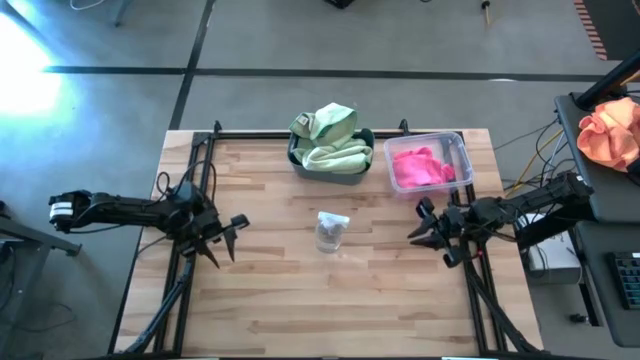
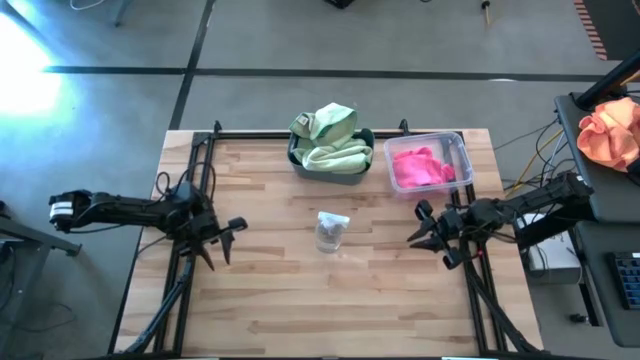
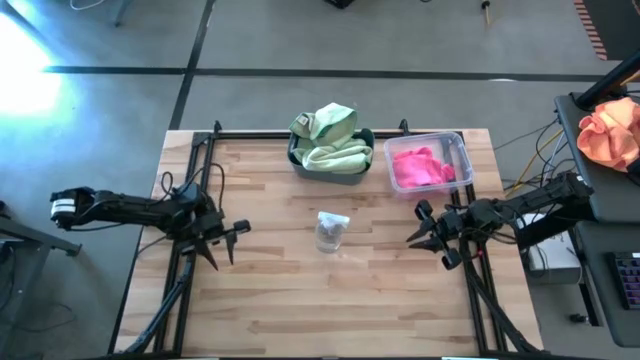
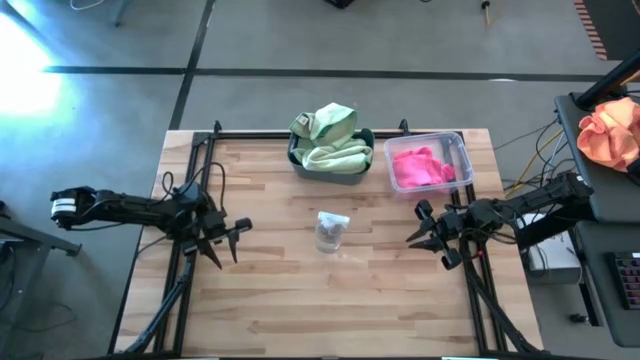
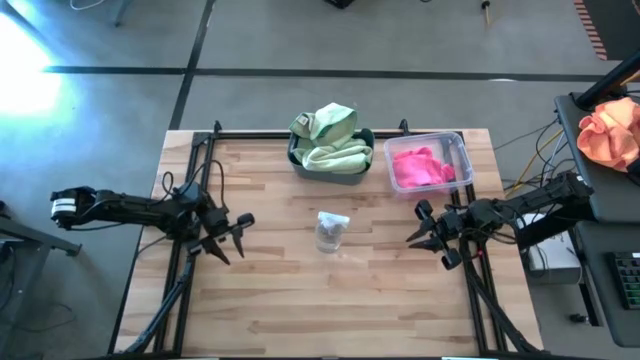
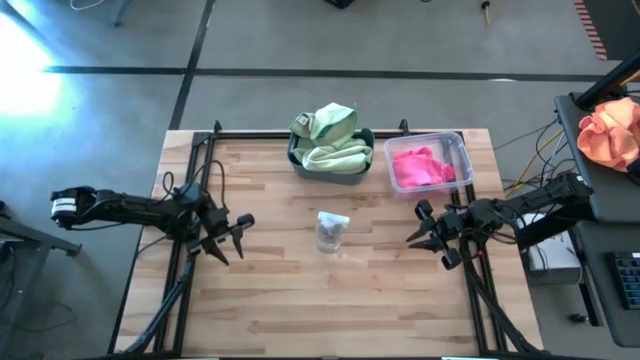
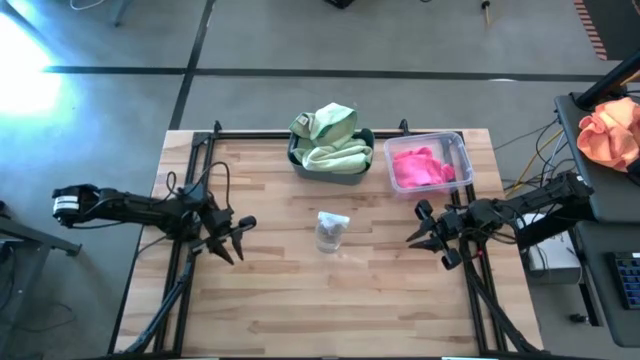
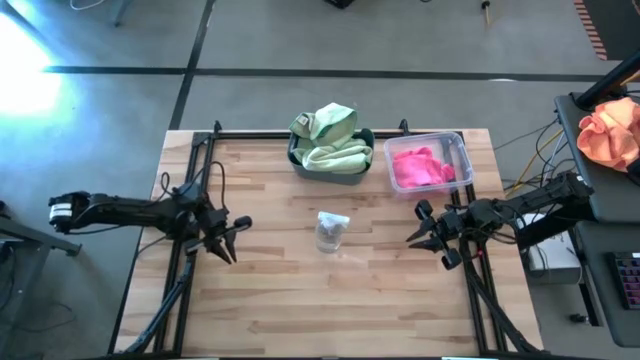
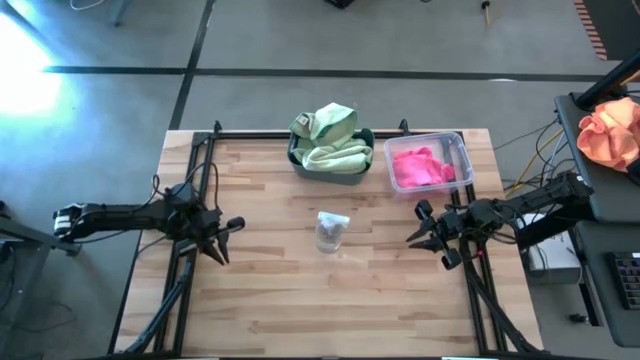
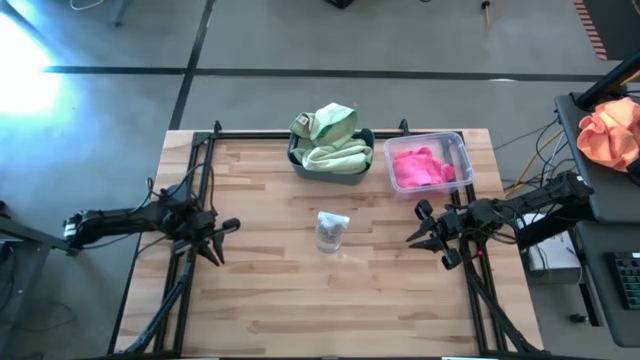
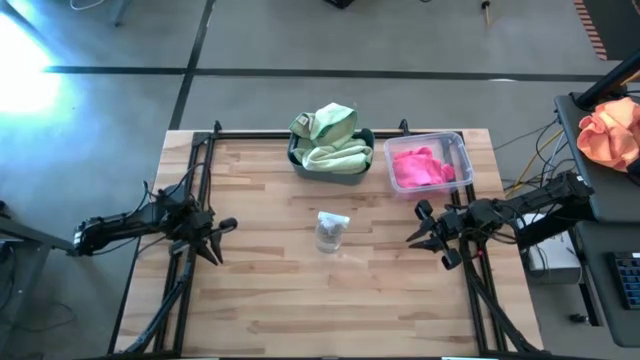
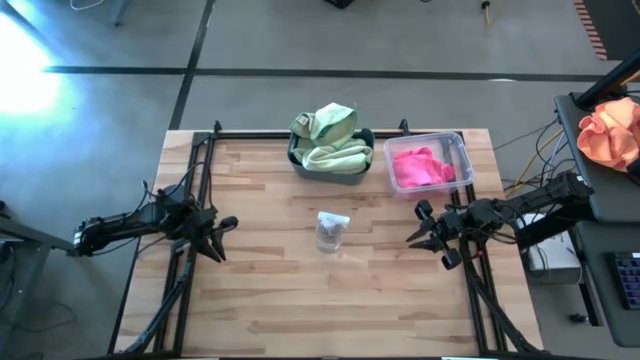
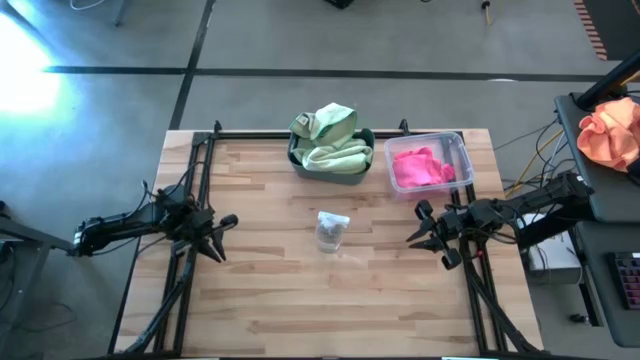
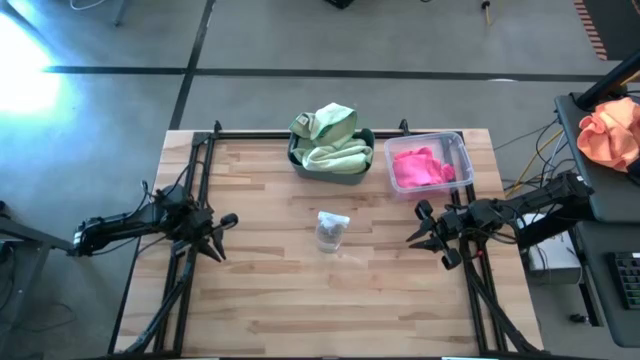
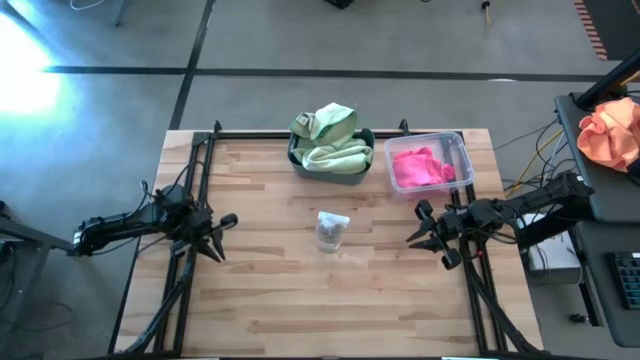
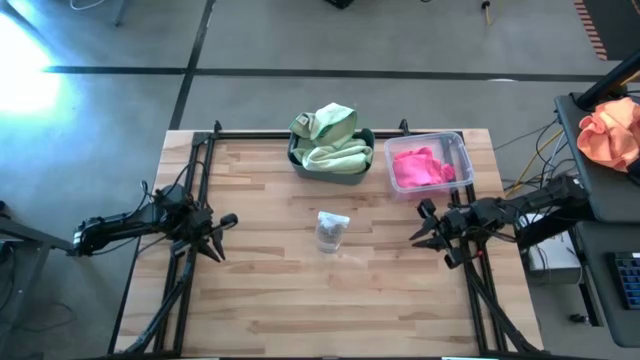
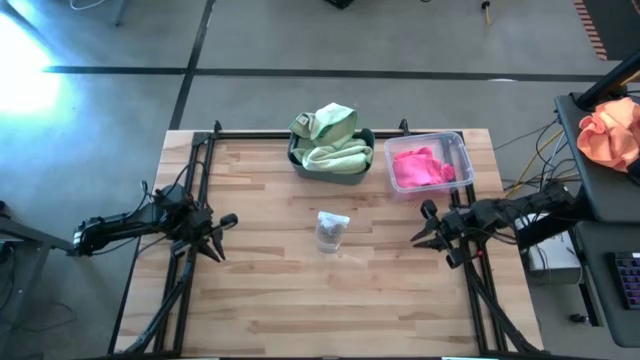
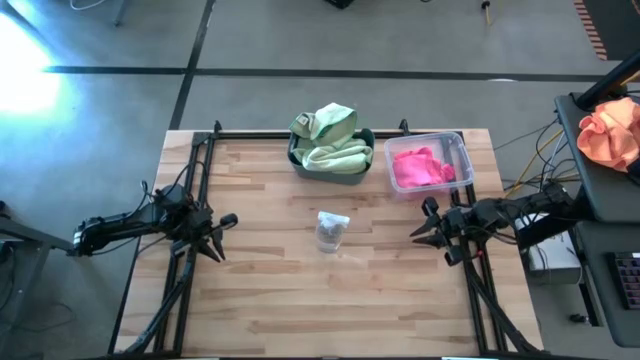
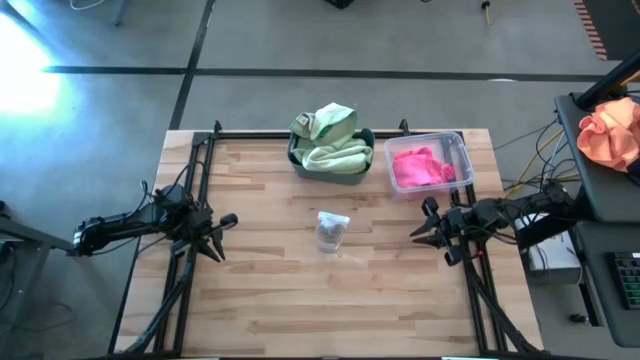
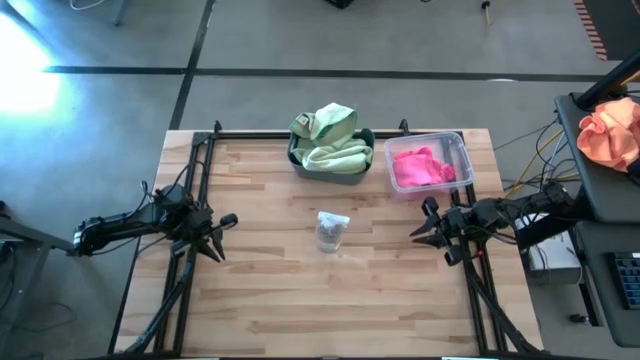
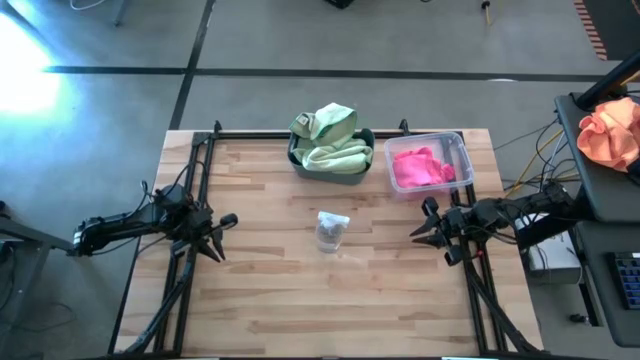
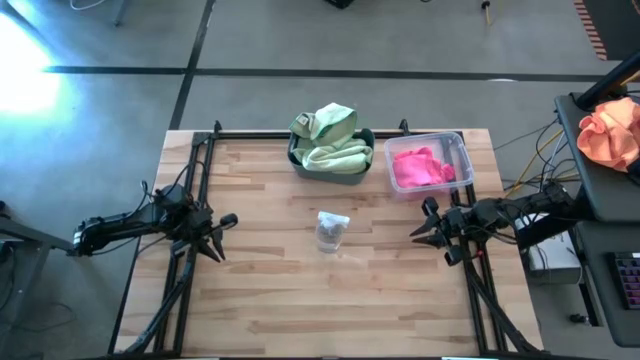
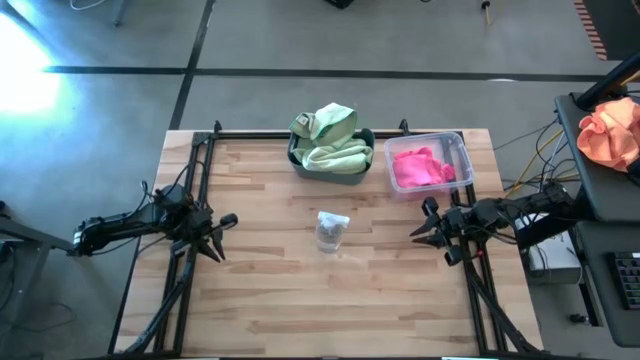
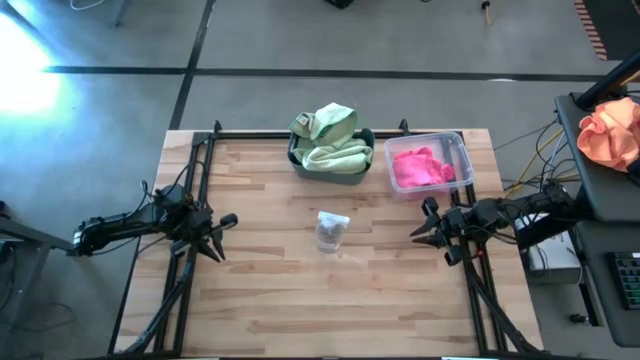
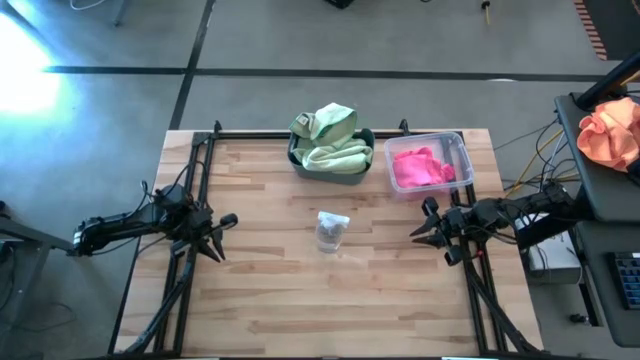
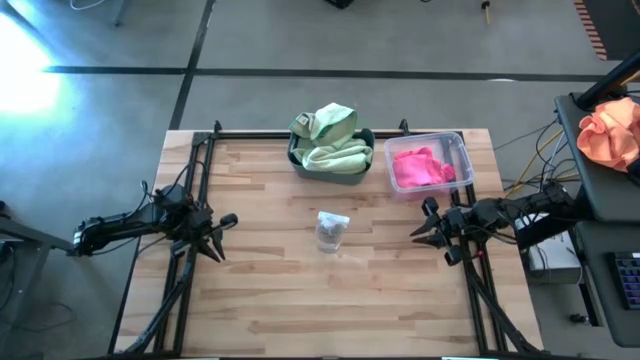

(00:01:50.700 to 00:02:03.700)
Task: Sort microfiber towel by color & place in baskets
Return to Home Position

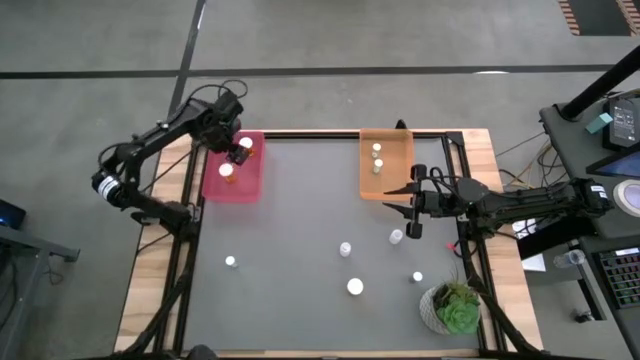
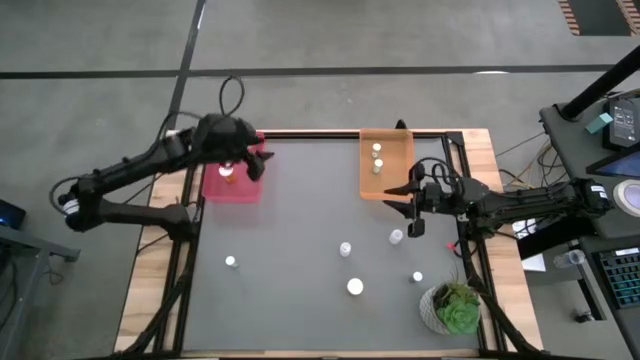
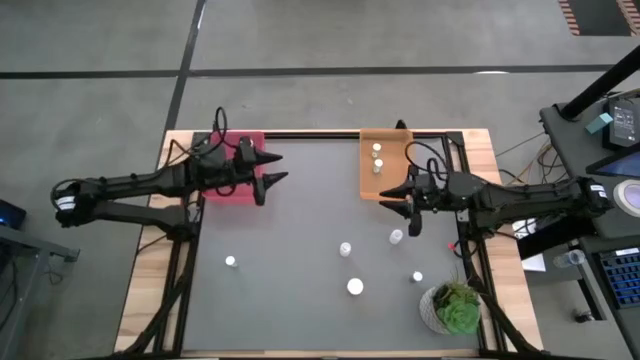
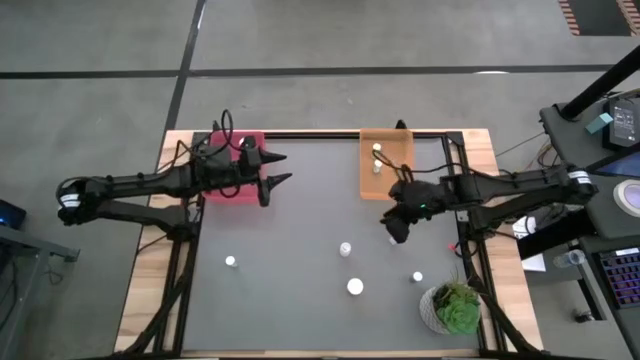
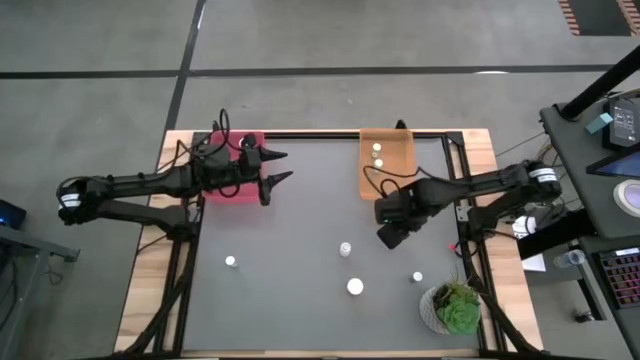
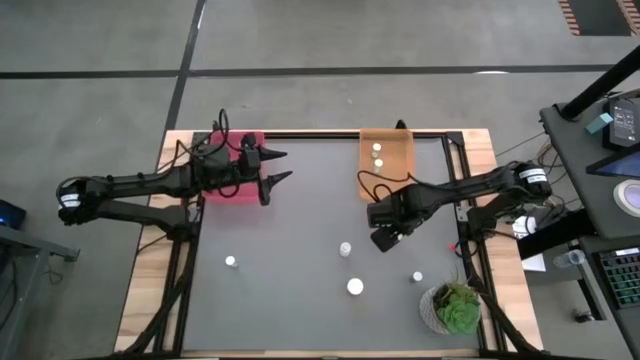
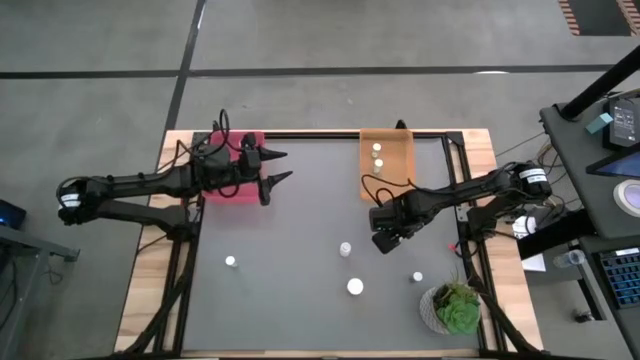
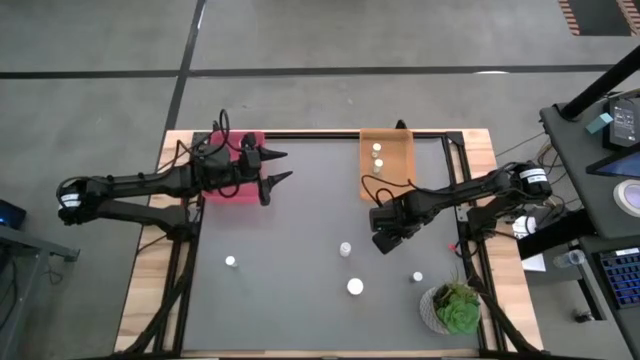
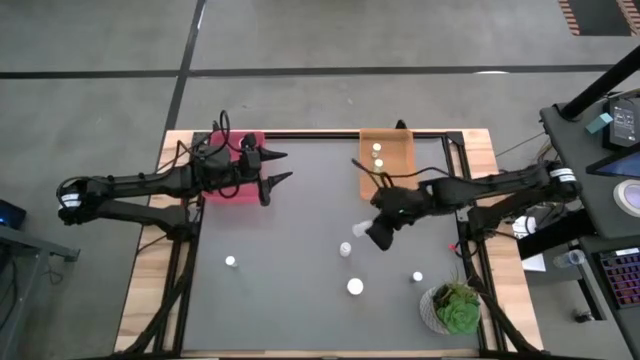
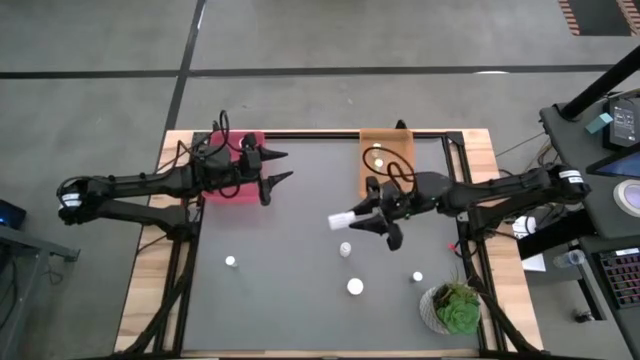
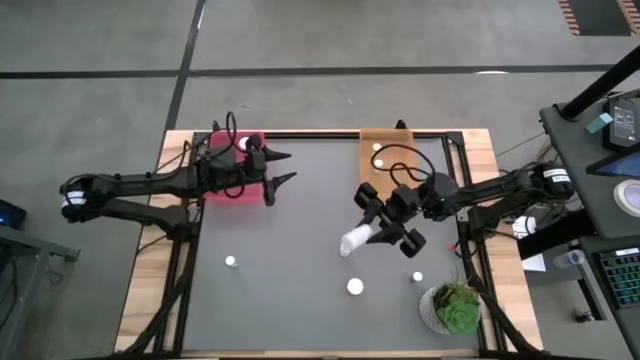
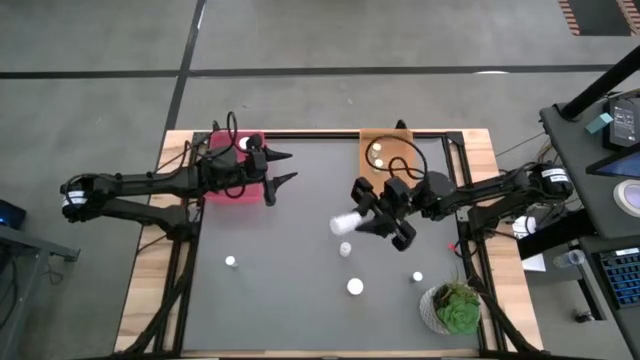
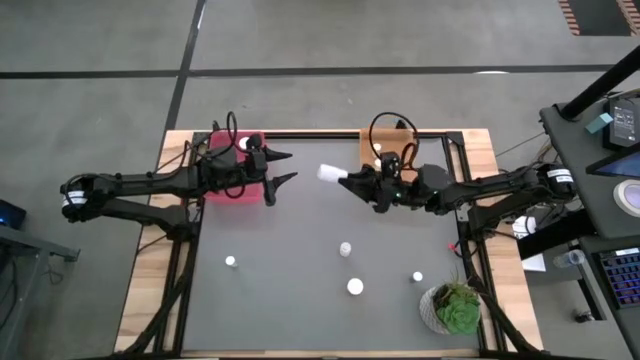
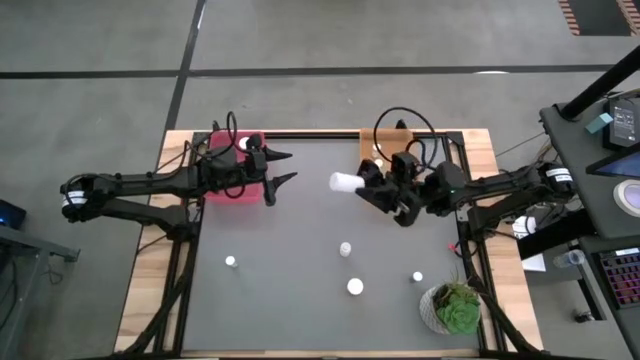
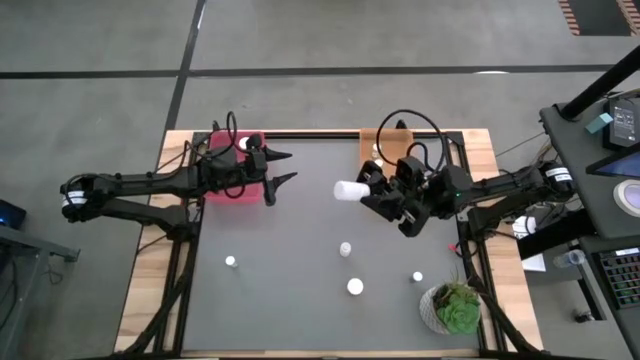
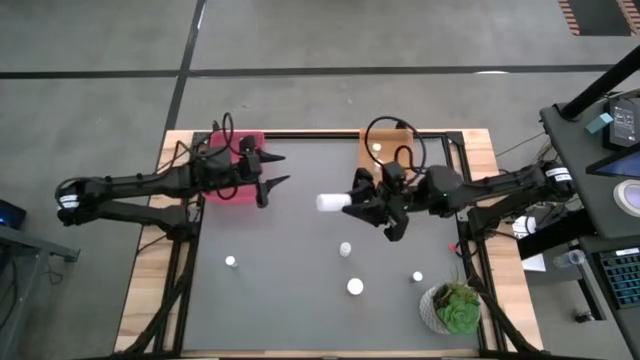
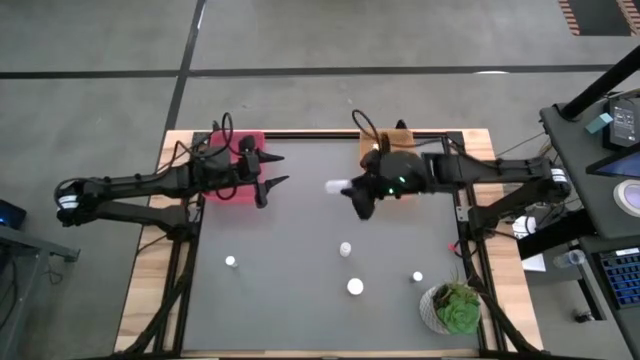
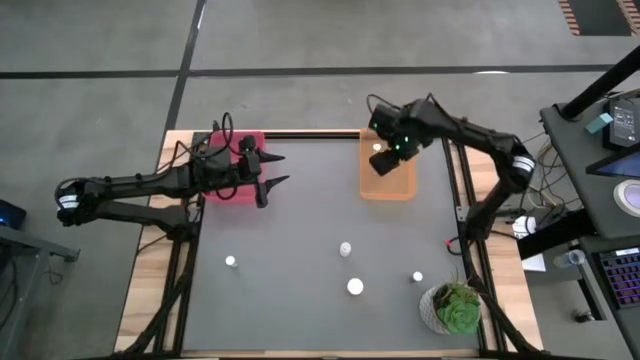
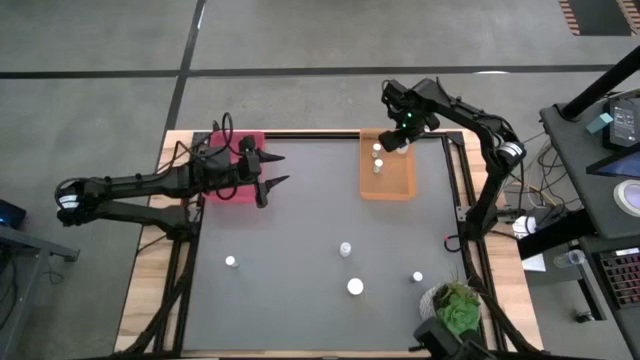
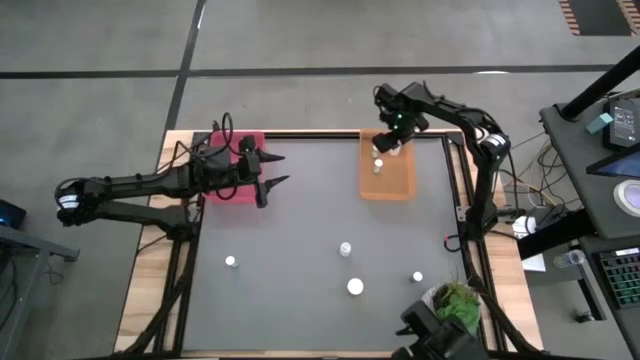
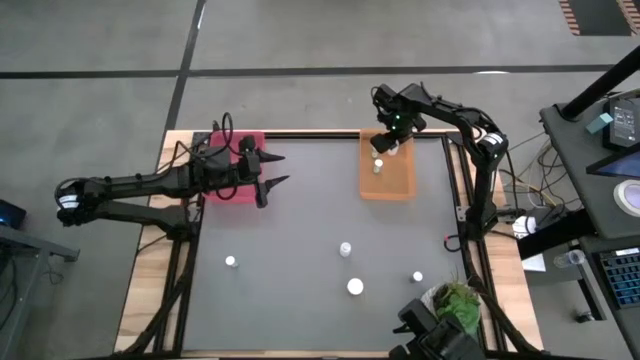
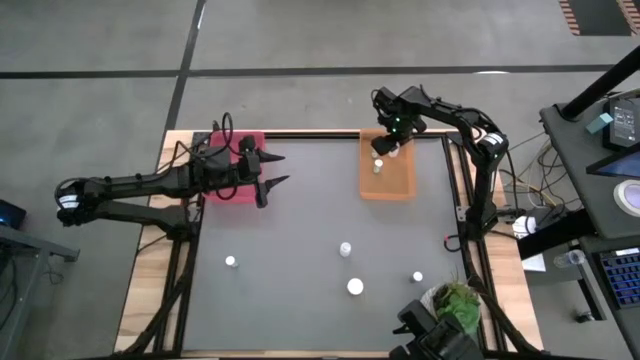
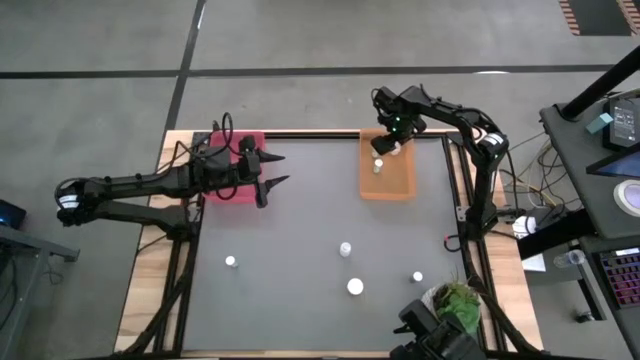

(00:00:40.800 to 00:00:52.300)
Task: Pick and place medicine bottles into bin by pill shape (circle, oval)
Put the right white tablet bottle into the orange bin
